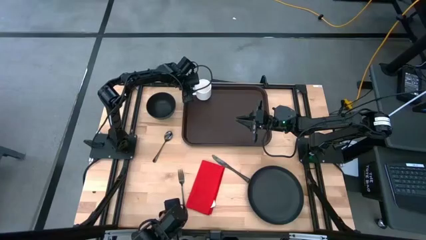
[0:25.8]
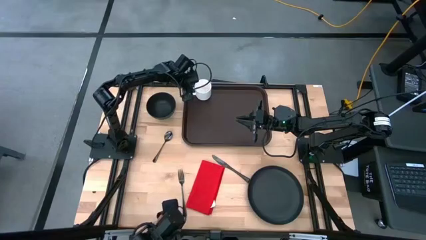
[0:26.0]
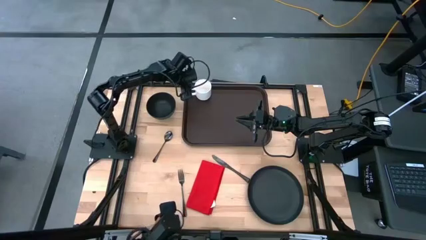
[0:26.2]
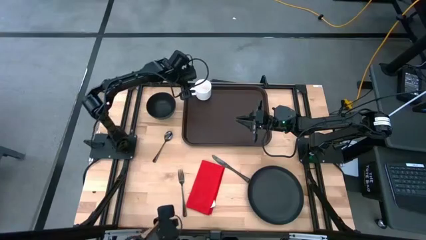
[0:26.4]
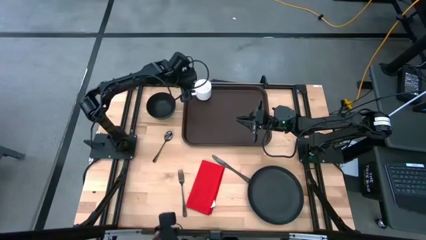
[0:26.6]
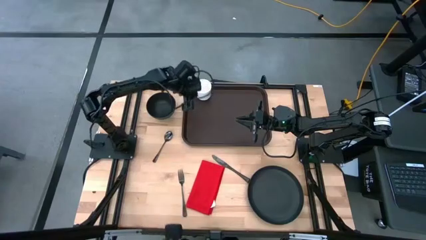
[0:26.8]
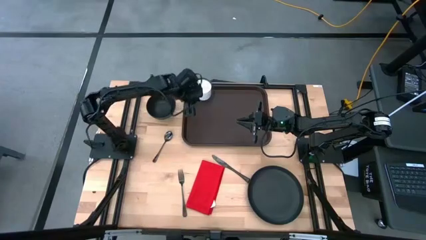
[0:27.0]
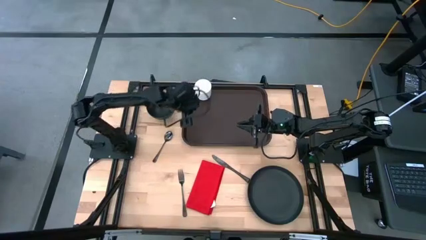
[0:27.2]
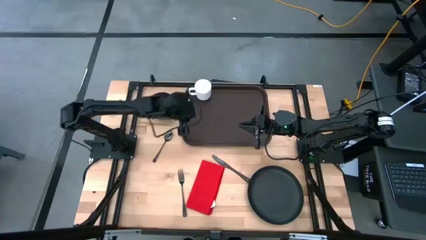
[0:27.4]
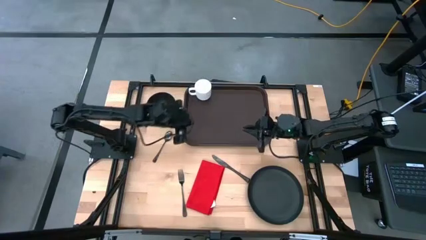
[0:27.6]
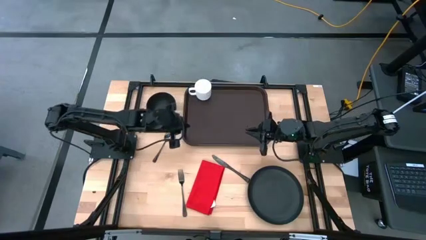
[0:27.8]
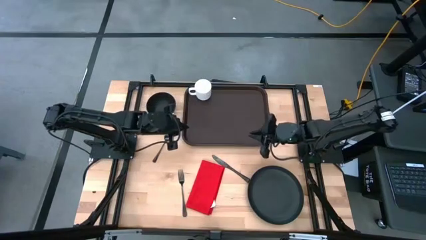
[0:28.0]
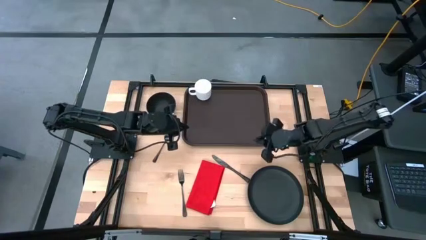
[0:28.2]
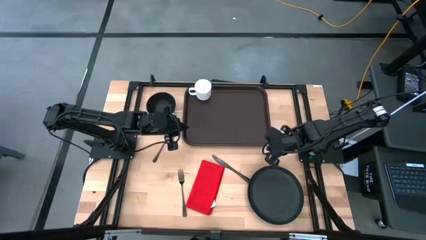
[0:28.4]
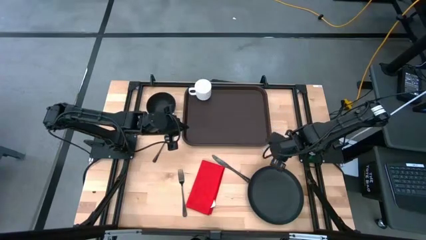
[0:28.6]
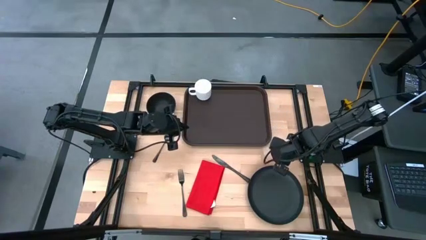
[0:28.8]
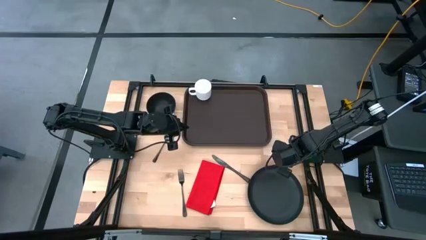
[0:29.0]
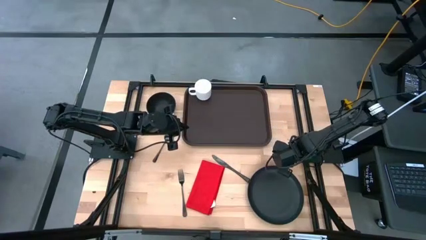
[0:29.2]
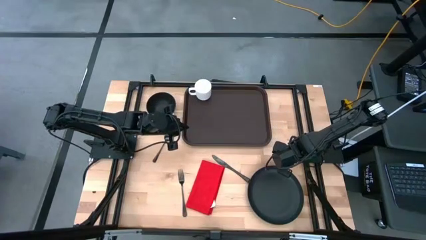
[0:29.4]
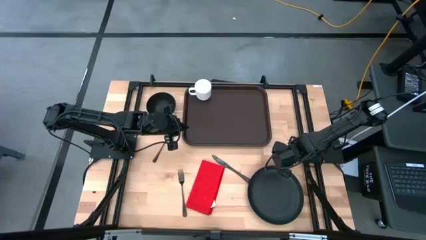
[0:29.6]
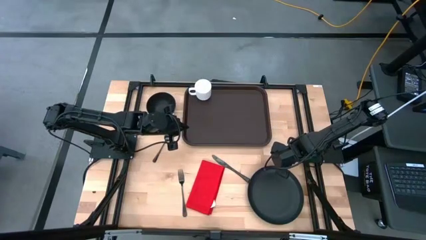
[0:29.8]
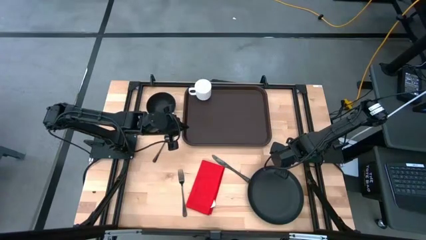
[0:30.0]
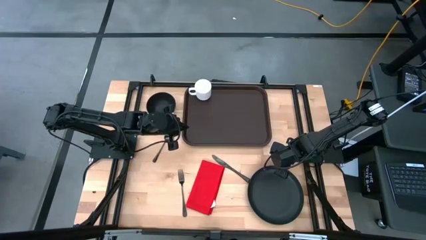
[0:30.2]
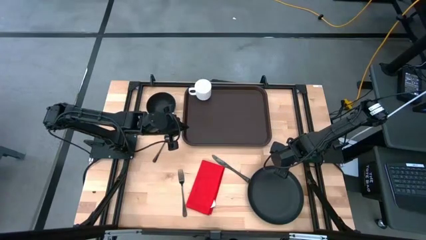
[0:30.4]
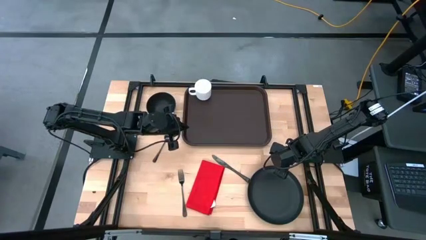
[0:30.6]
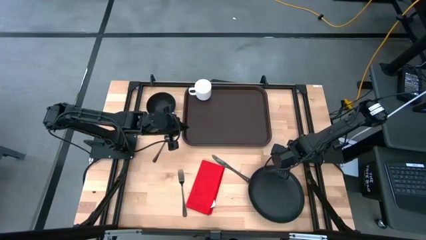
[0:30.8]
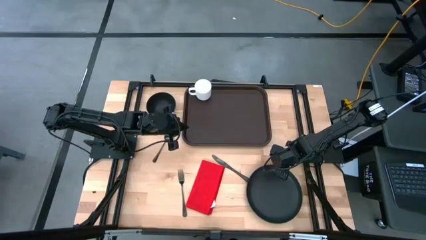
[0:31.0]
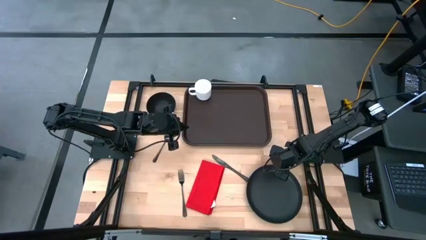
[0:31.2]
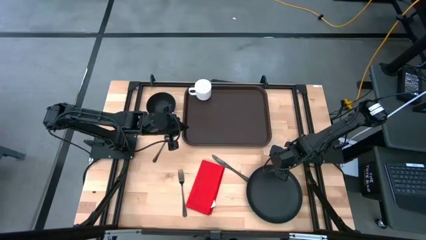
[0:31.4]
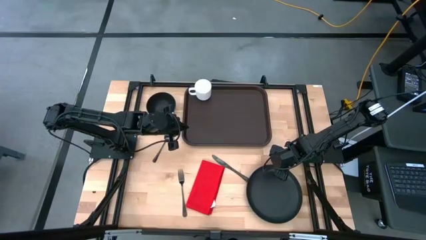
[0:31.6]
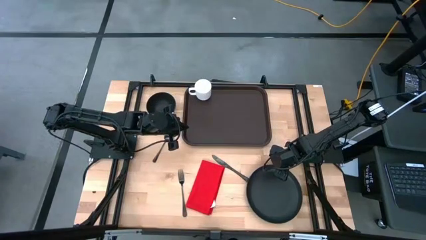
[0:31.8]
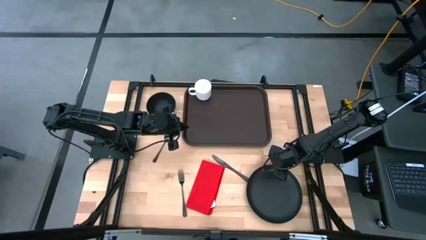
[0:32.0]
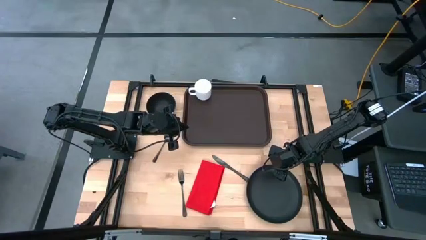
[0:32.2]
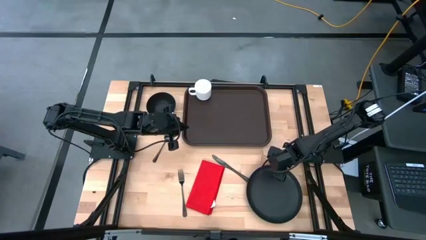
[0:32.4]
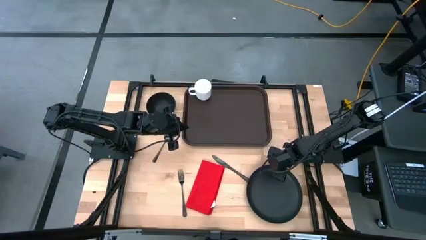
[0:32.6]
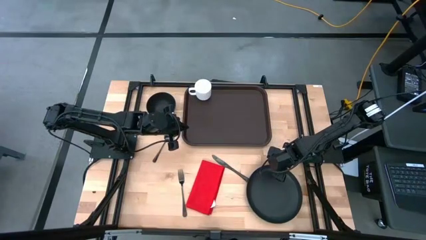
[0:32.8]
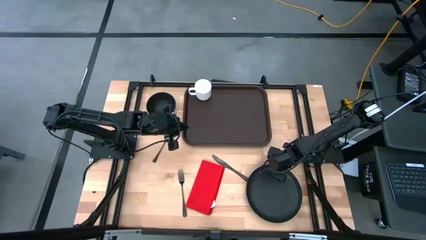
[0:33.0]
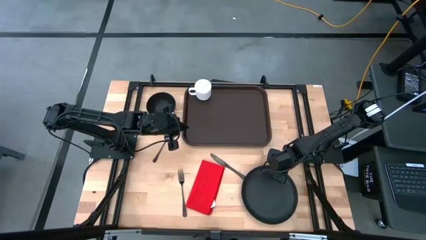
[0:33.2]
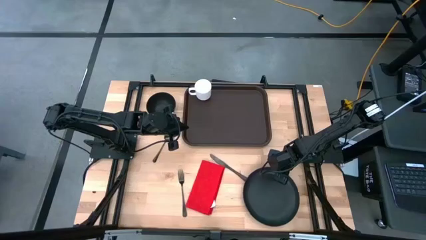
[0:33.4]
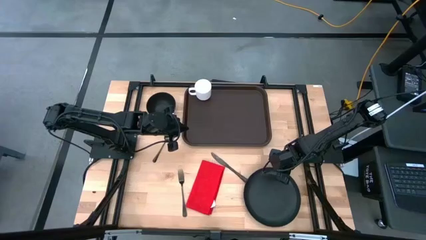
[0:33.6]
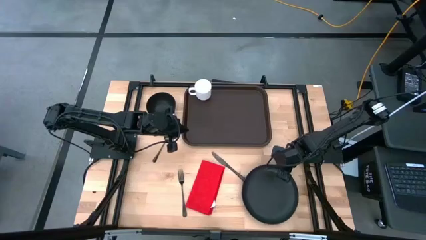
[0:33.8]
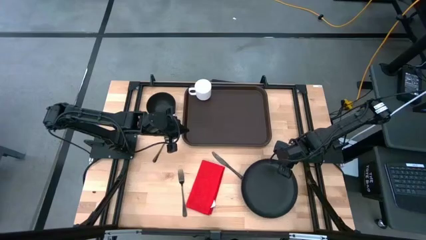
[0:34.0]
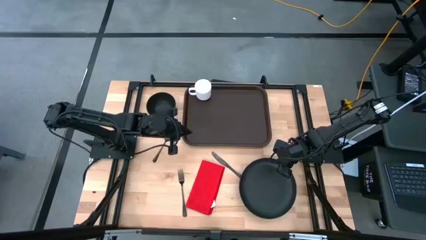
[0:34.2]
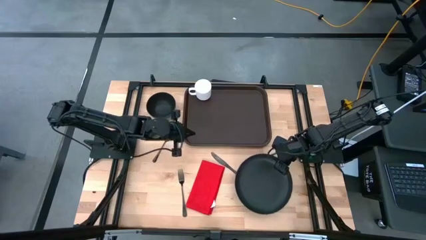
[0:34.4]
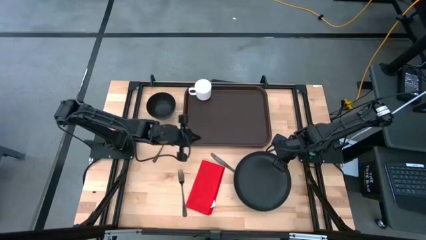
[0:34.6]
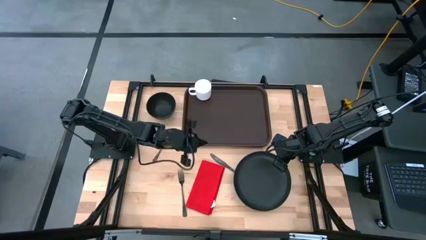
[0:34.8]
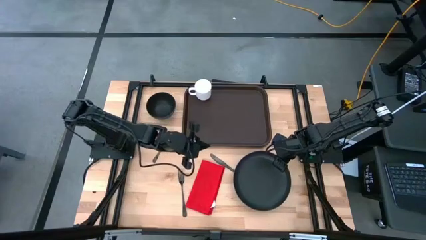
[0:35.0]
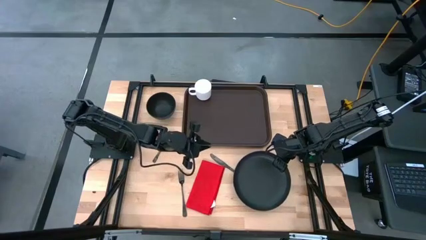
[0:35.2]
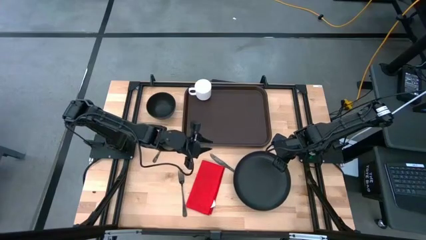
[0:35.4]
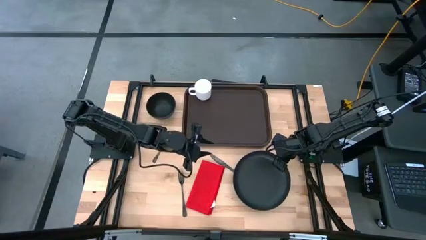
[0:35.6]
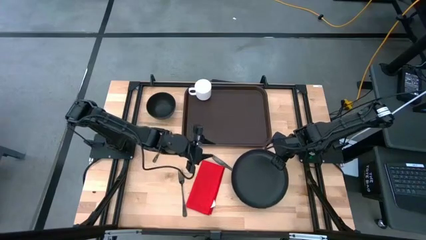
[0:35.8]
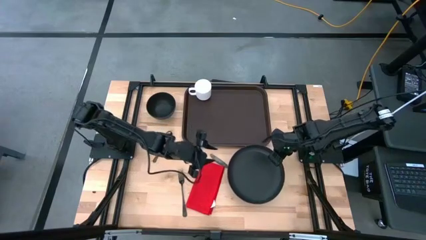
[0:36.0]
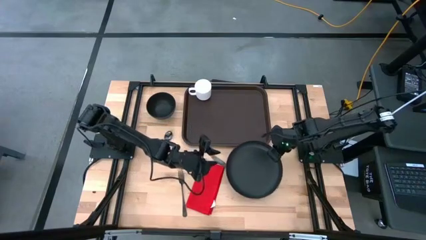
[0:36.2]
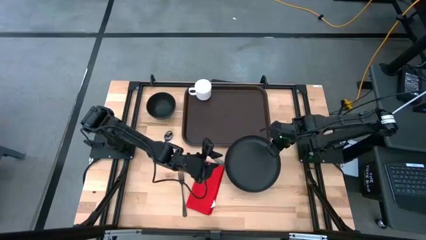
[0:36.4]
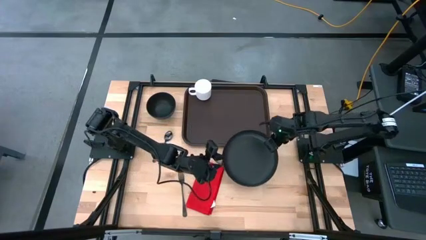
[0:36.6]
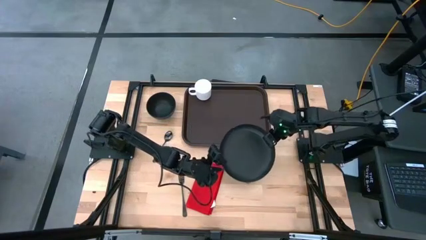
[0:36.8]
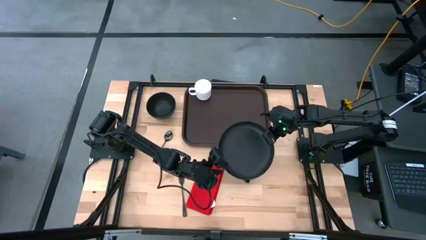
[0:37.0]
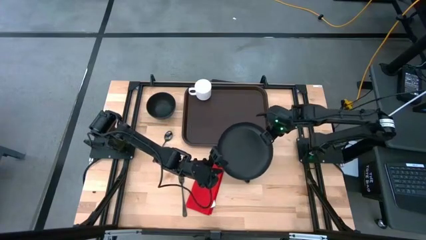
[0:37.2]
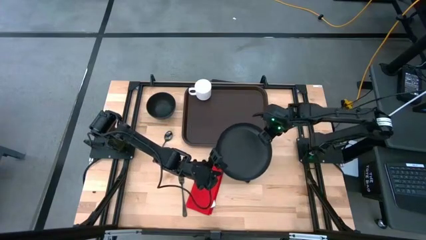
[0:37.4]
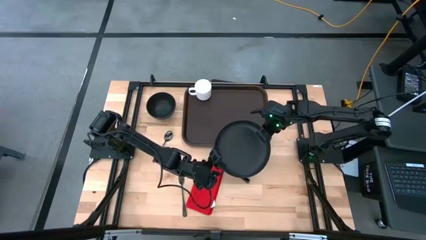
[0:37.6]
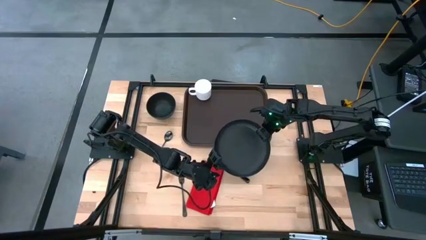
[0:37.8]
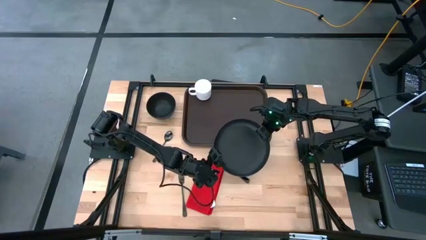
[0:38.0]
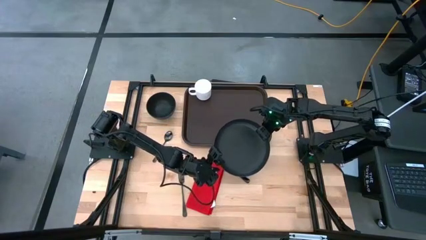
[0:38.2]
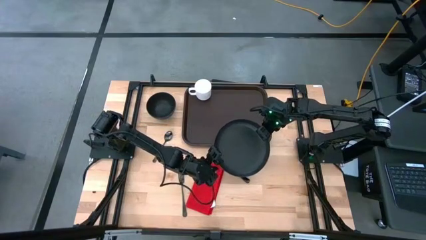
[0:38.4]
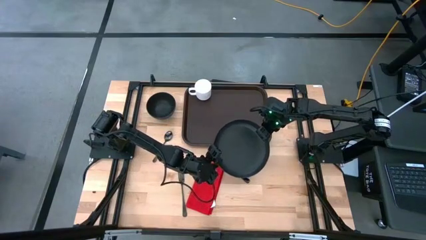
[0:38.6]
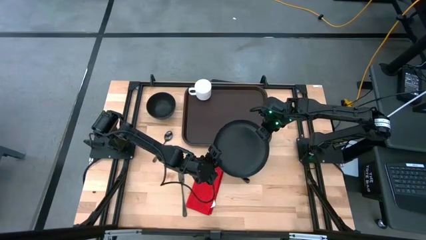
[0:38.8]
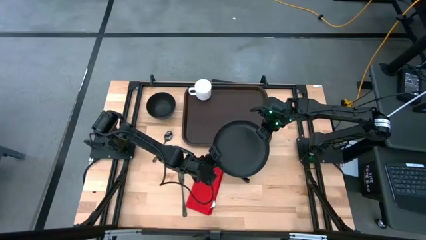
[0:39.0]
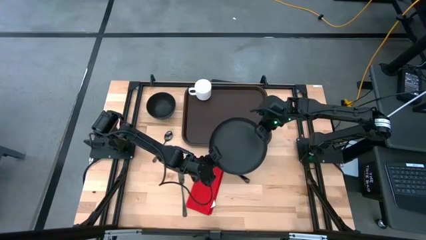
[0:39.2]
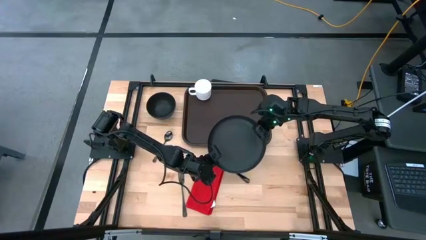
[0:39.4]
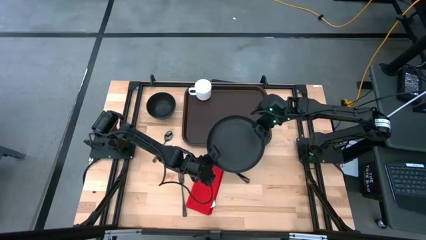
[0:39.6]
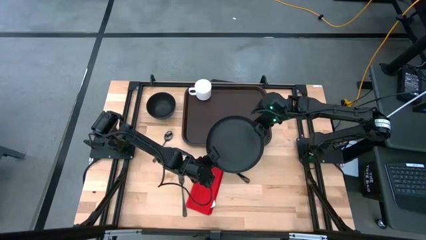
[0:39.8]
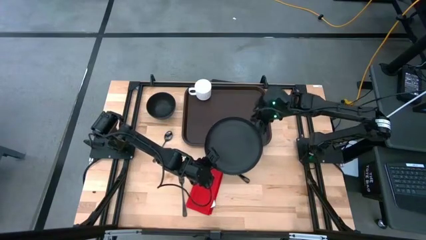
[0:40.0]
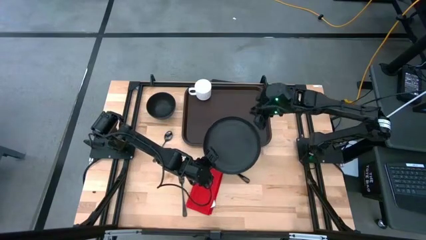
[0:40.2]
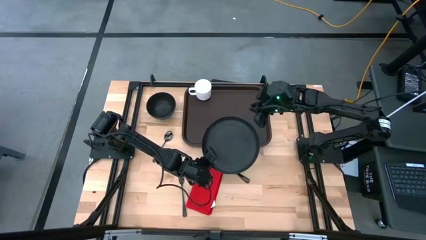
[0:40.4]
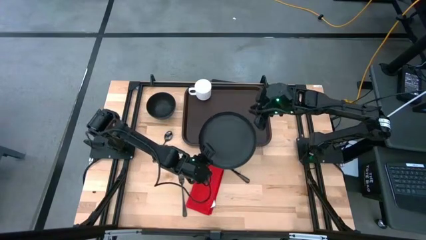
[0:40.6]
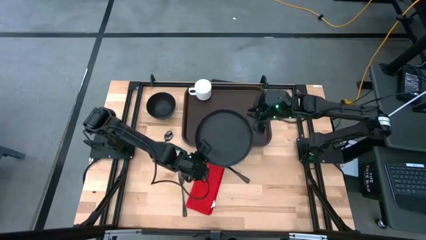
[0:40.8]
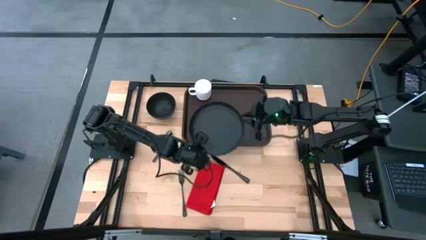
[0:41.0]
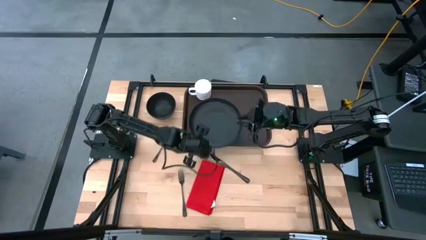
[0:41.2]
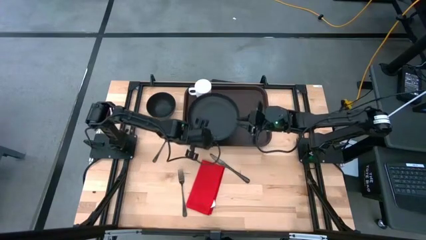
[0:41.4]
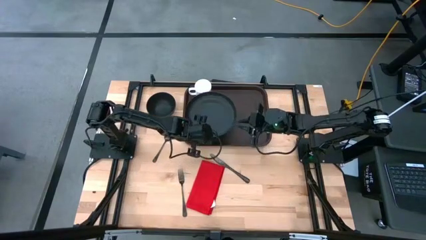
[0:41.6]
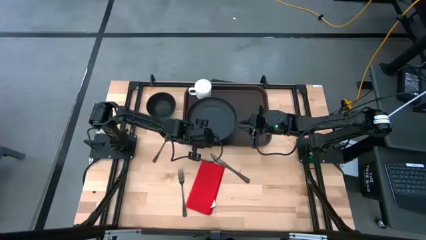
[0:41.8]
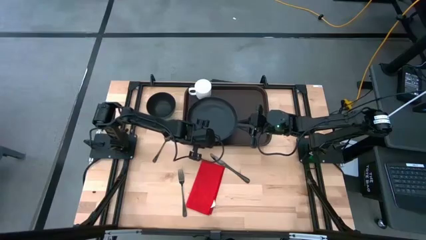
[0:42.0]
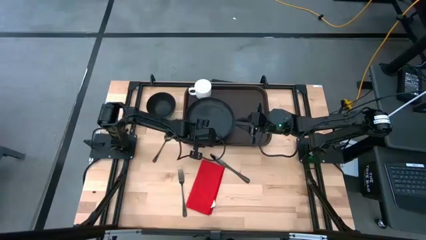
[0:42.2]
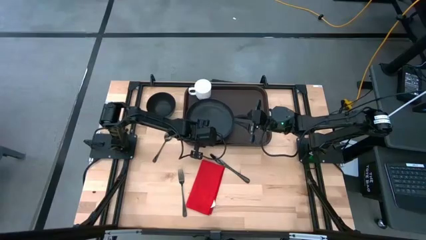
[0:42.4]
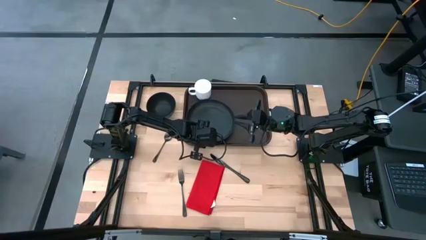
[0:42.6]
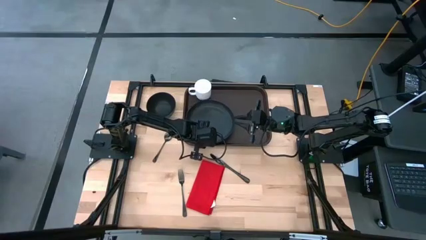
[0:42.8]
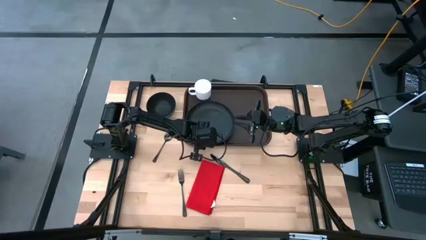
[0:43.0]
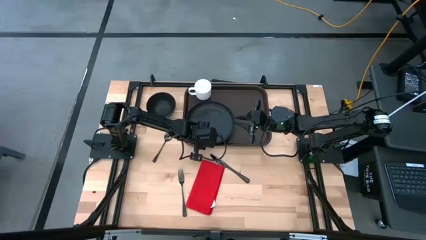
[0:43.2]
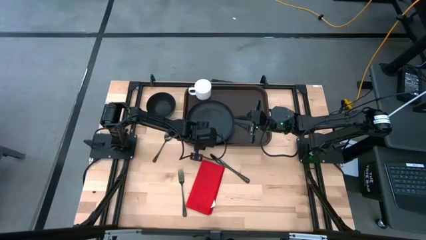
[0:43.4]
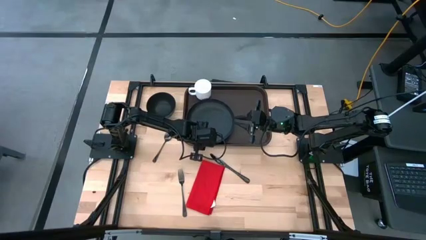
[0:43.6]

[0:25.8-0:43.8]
Task: Set up tray
Put the black plate on the brown serving tray to the bottom right of the white cup
